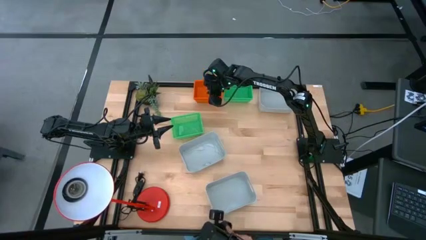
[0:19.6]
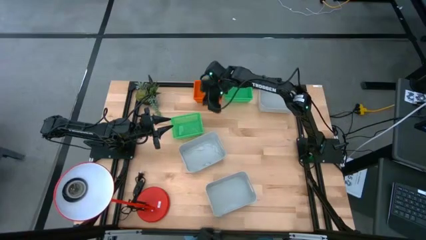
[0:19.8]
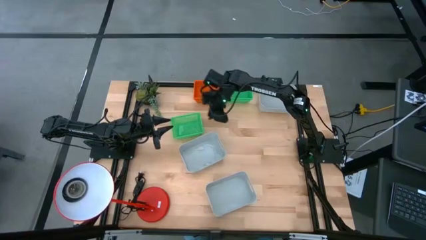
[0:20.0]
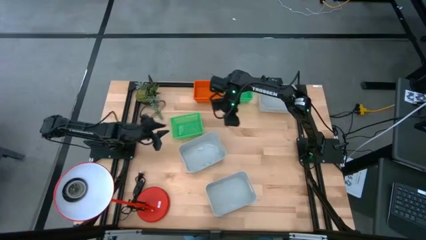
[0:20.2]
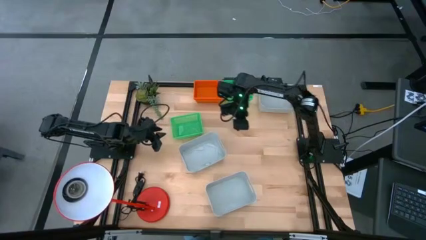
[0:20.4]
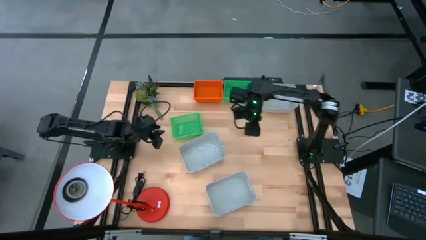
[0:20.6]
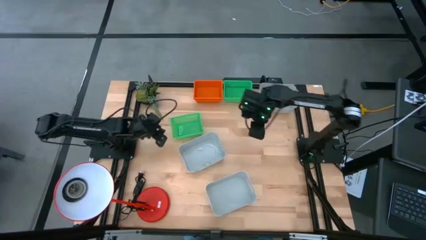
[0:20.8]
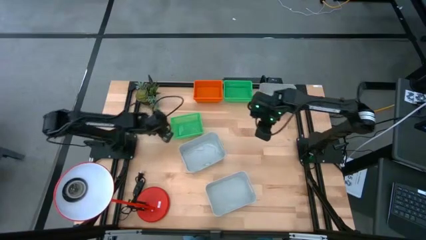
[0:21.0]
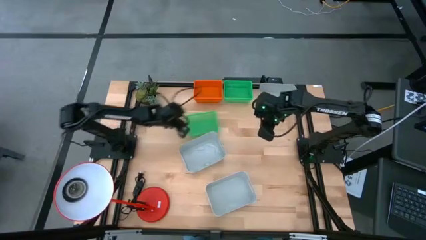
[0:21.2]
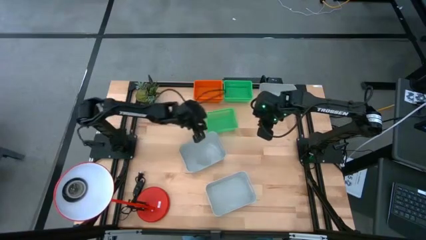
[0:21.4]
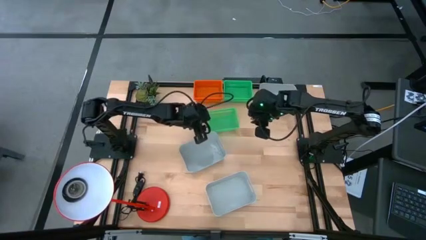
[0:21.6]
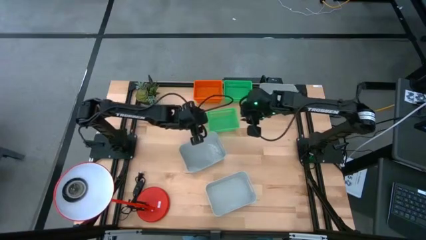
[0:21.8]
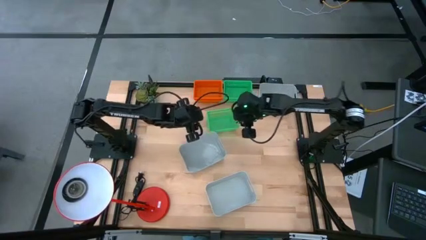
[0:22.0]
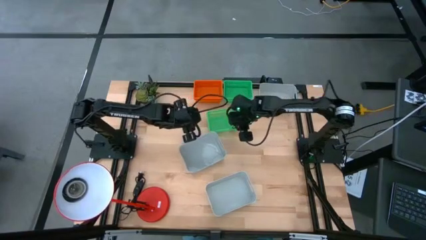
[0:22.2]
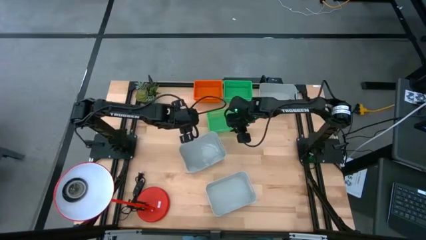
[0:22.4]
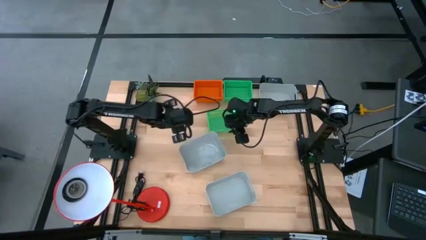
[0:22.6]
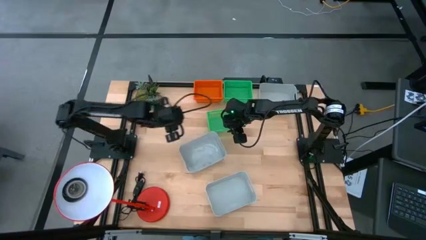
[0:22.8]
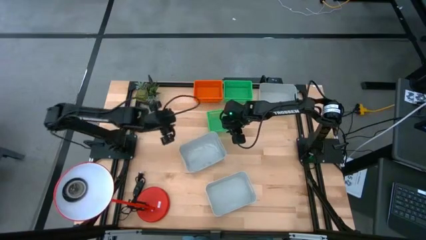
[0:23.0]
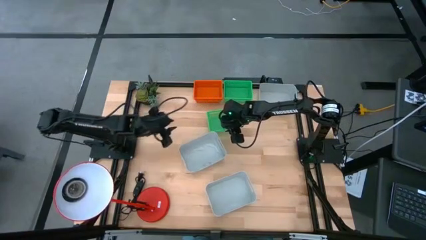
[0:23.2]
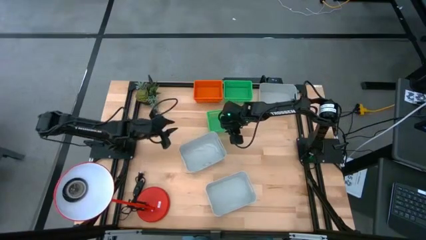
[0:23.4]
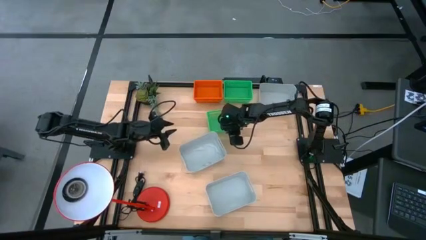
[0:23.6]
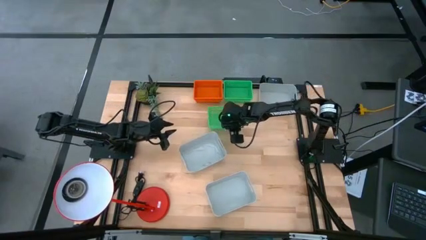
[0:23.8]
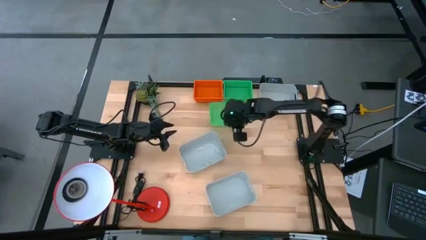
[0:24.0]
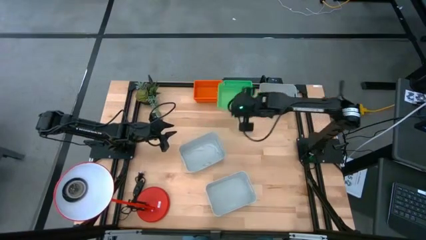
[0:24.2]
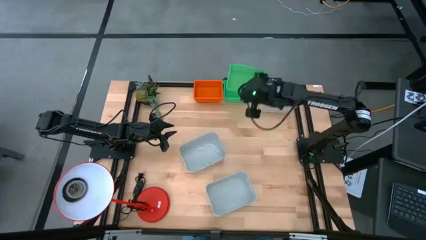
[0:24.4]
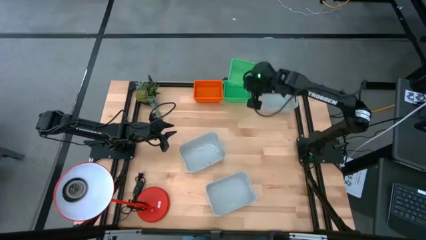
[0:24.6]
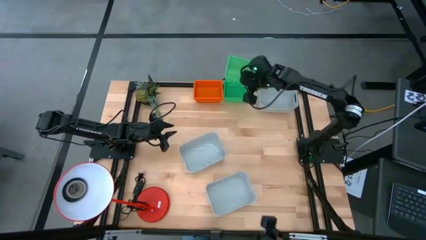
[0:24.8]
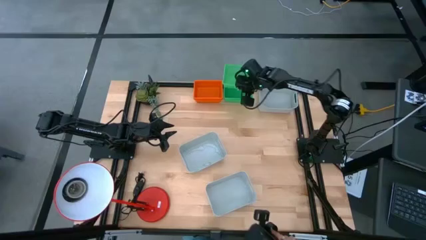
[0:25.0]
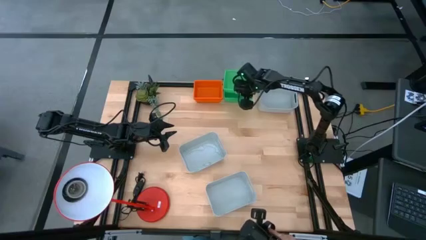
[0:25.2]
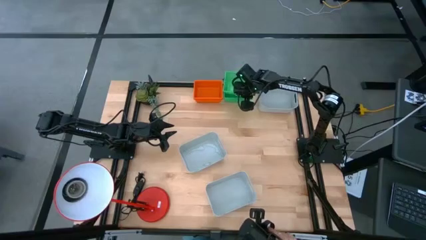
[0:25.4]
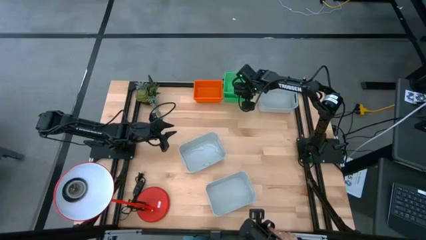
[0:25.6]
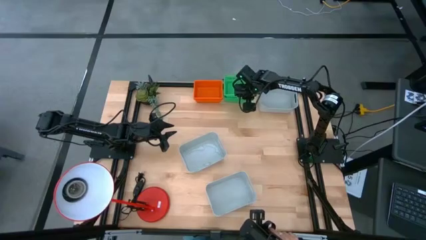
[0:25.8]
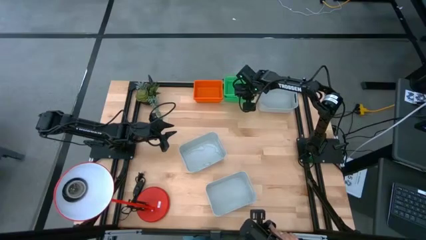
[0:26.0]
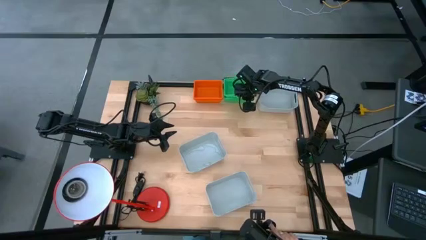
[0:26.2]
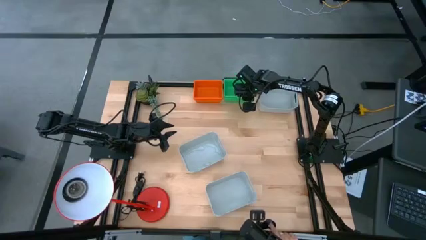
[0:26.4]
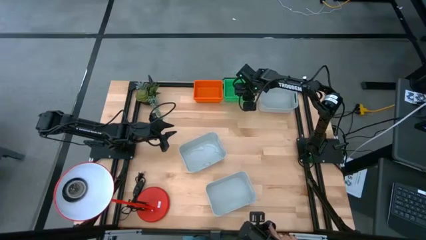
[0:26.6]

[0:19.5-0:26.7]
Stack the bottom green bin on the top green bin

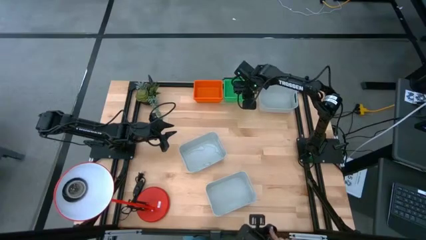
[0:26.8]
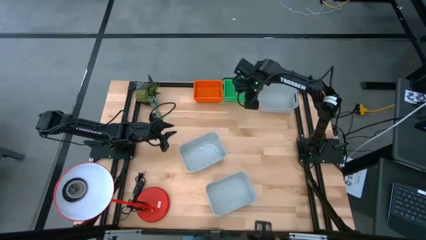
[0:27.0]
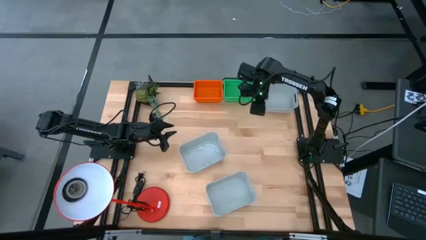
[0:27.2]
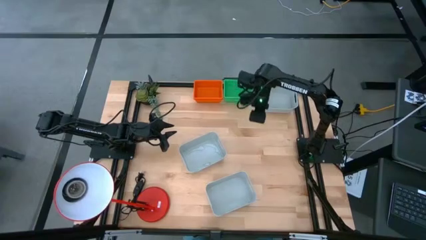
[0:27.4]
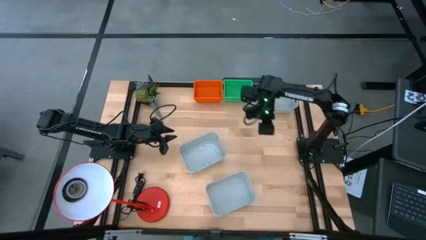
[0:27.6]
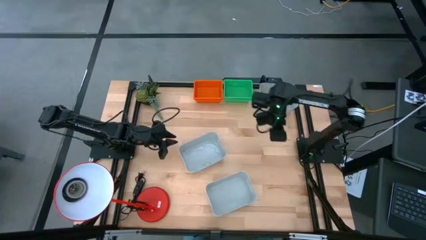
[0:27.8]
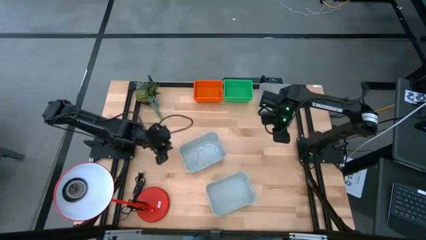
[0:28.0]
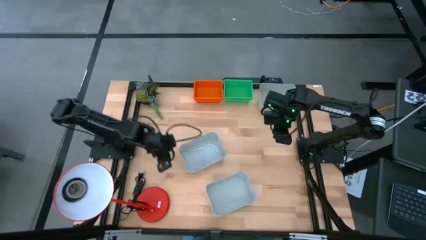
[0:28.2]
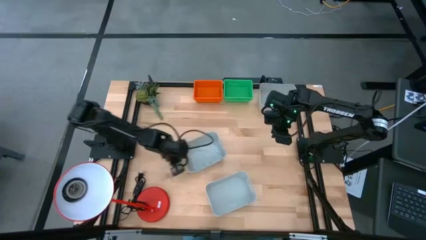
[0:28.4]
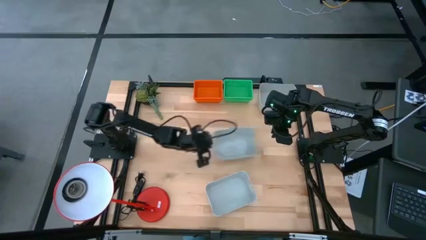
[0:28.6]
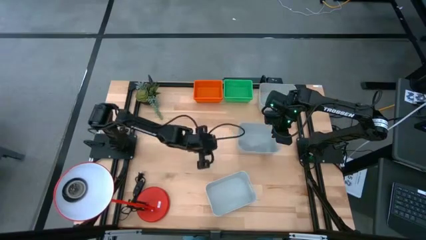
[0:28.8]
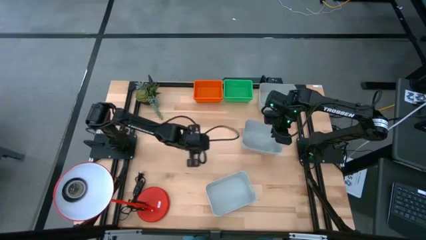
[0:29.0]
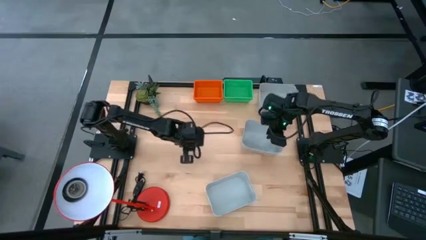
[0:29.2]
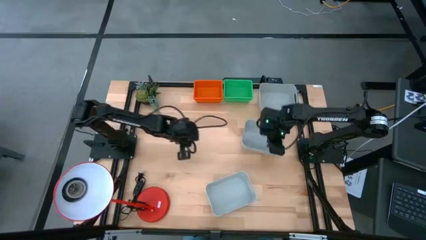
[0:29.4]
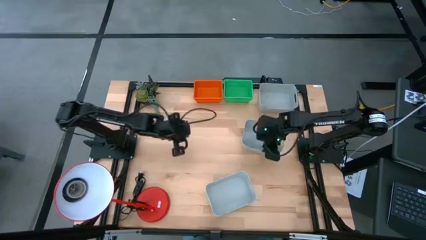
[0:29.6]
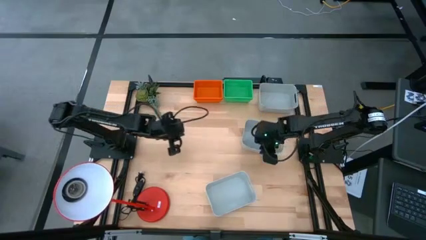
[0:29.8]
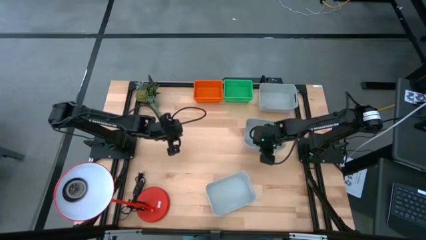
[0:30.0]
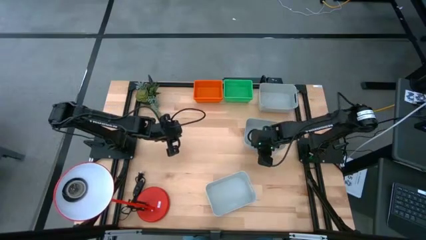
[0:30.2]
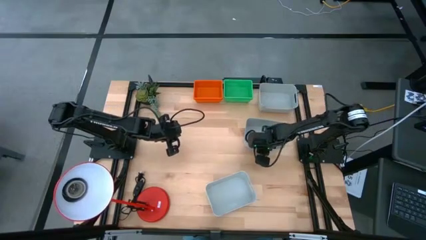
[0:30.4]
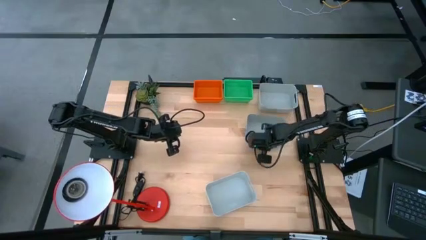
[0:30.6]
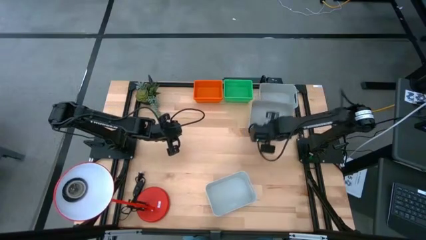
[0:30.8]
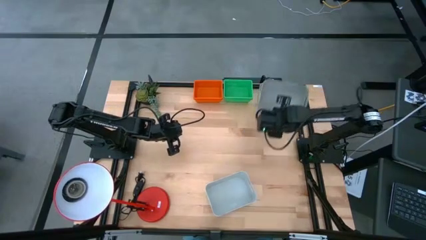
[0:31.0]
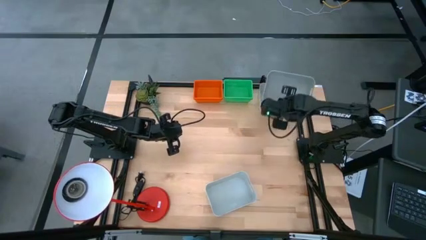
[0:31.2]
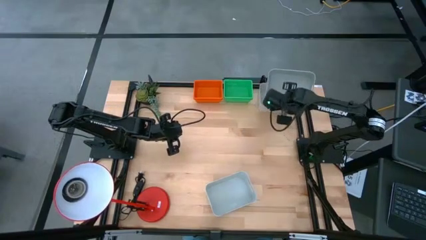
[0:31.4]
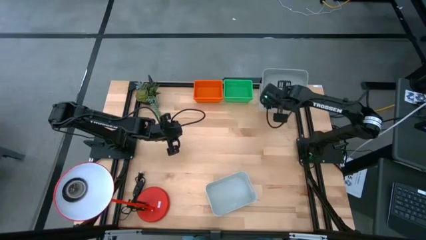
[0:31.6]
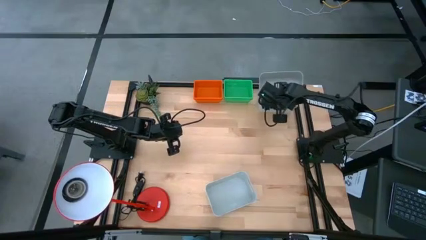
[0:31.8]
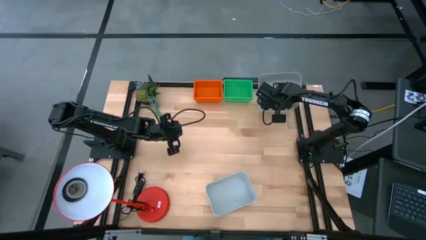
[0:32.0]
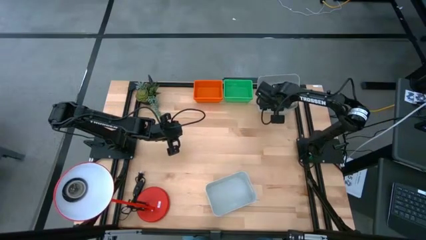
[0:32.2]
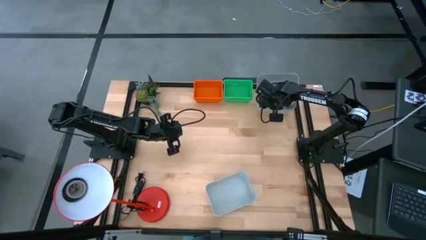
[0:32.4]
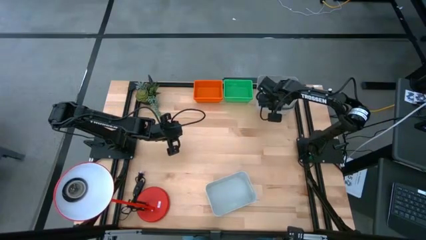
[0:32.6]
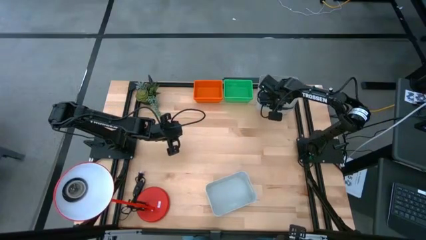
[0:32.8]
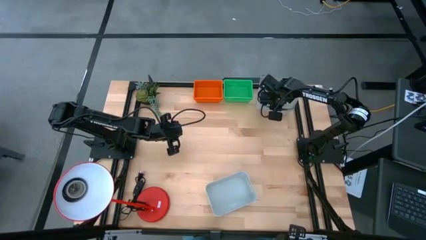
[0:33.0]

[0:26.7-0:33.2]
Stack the middle gray bin on the top gray bin
